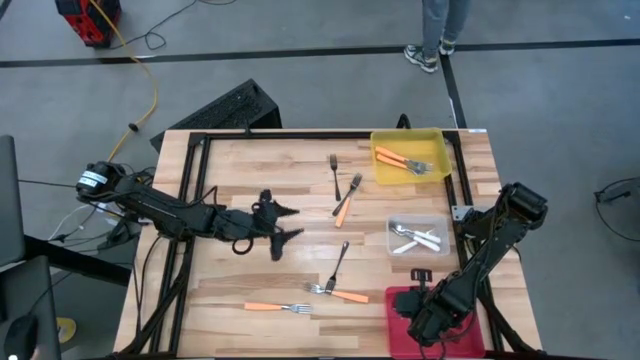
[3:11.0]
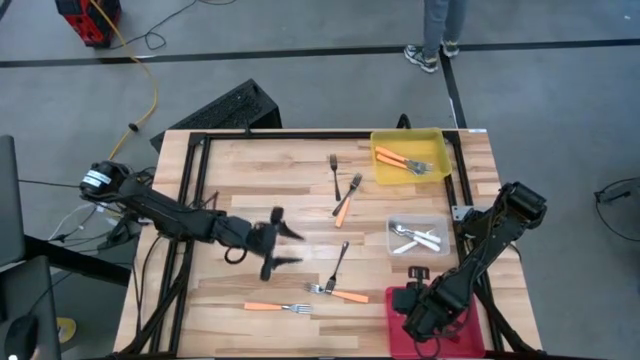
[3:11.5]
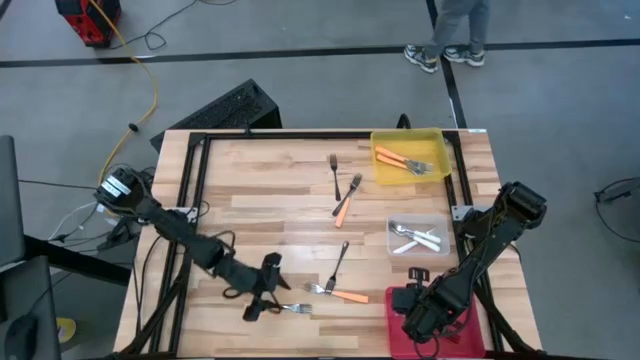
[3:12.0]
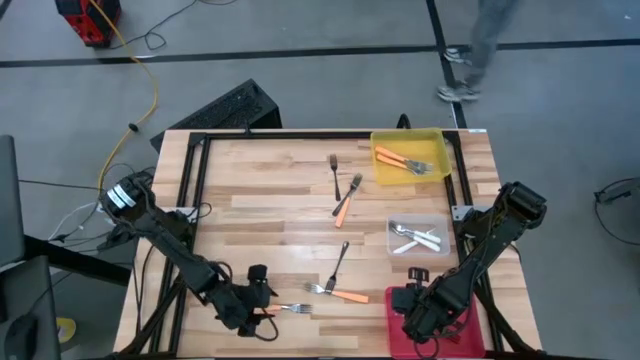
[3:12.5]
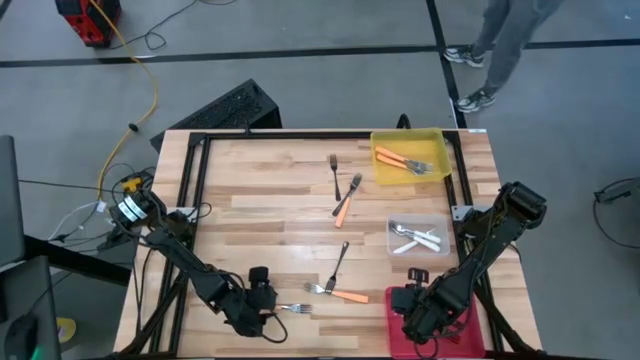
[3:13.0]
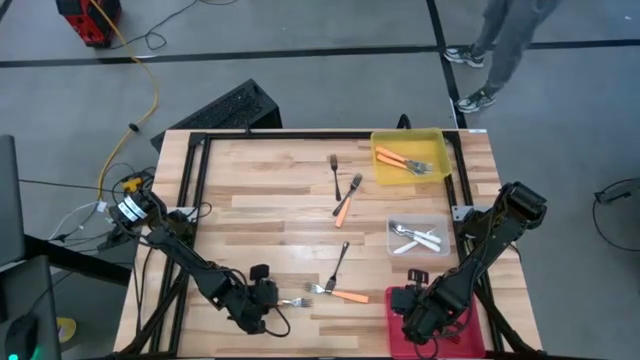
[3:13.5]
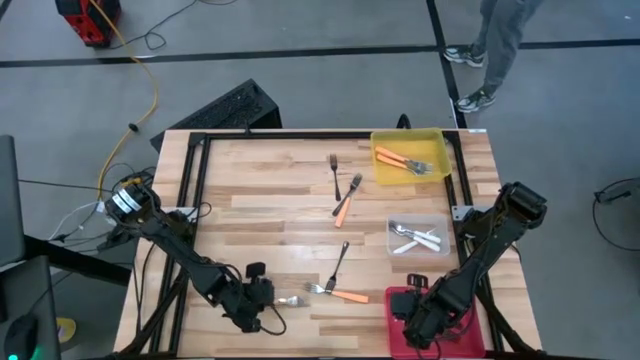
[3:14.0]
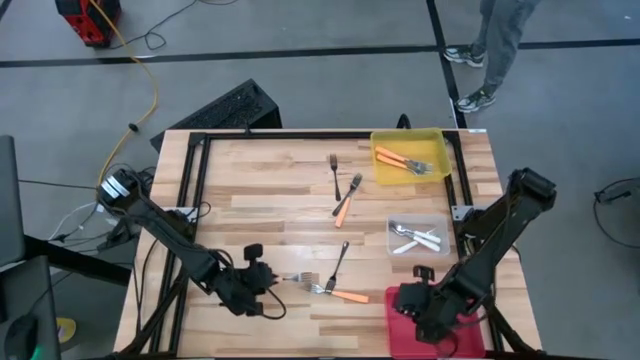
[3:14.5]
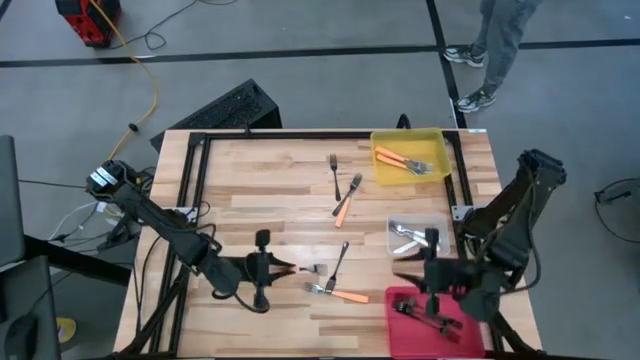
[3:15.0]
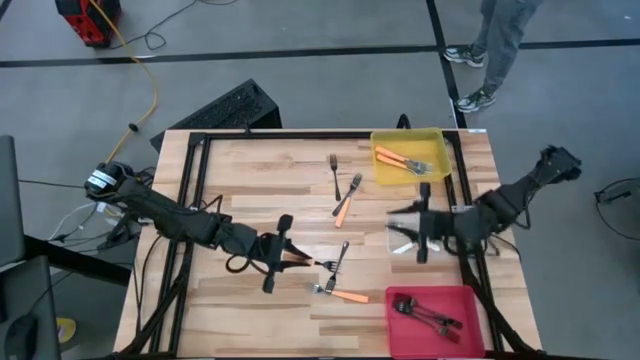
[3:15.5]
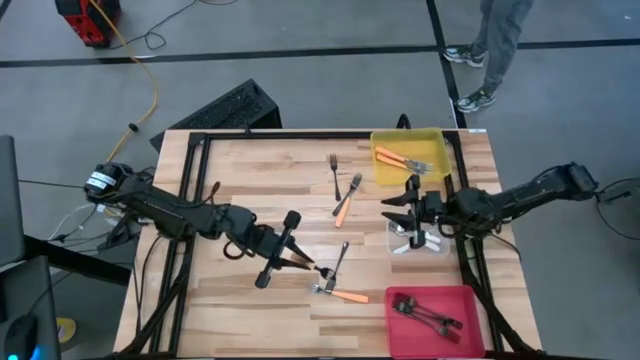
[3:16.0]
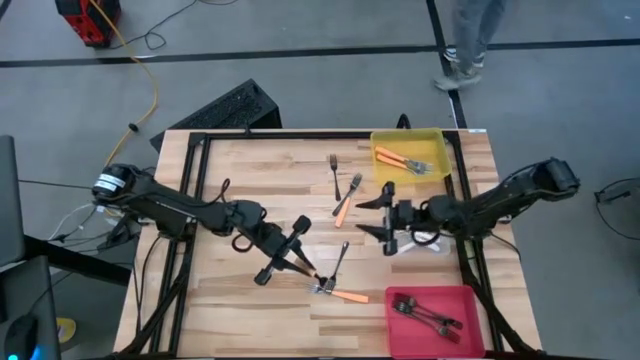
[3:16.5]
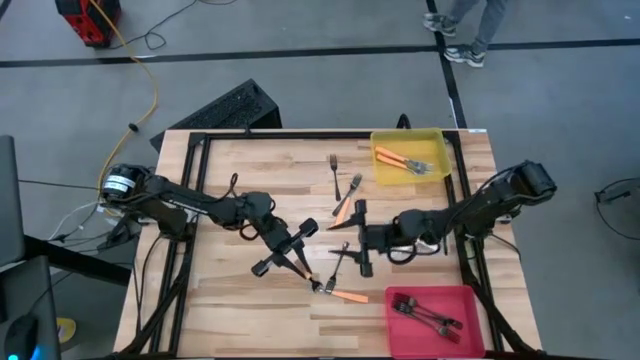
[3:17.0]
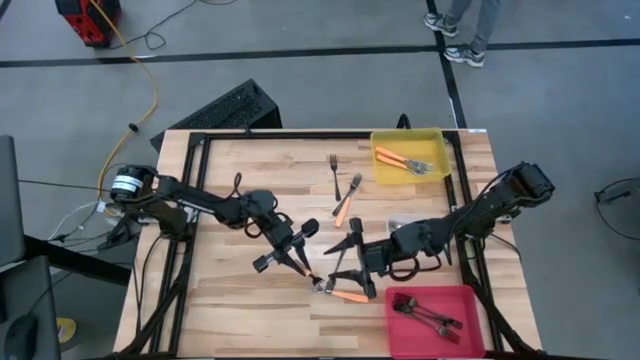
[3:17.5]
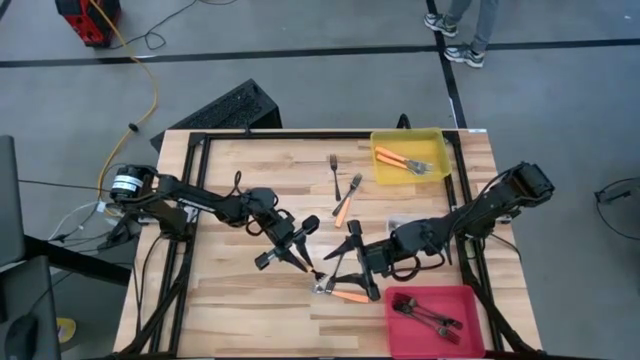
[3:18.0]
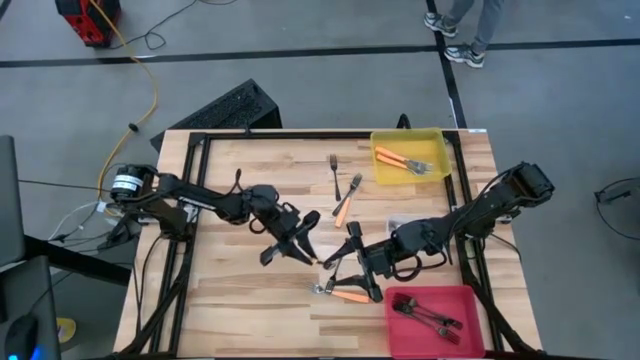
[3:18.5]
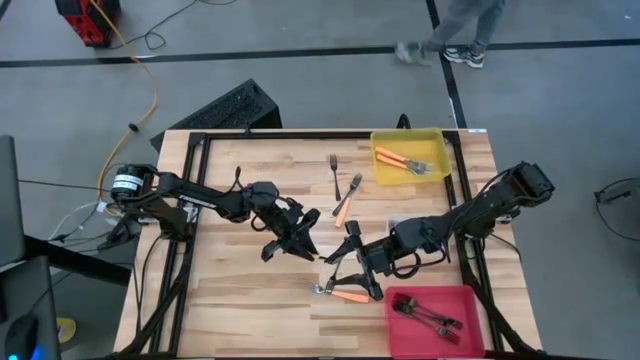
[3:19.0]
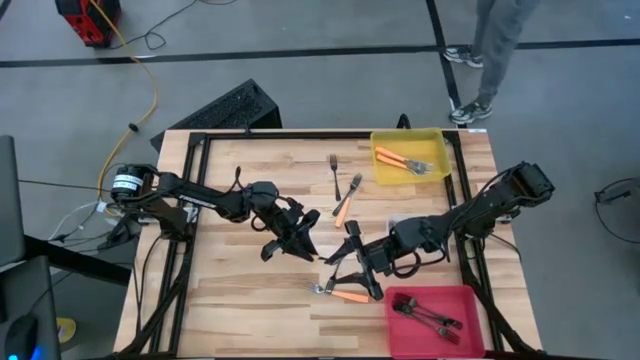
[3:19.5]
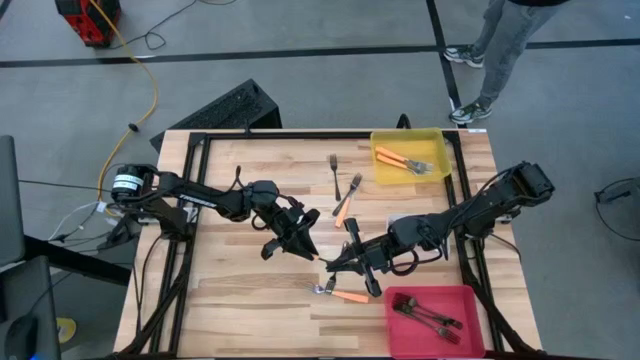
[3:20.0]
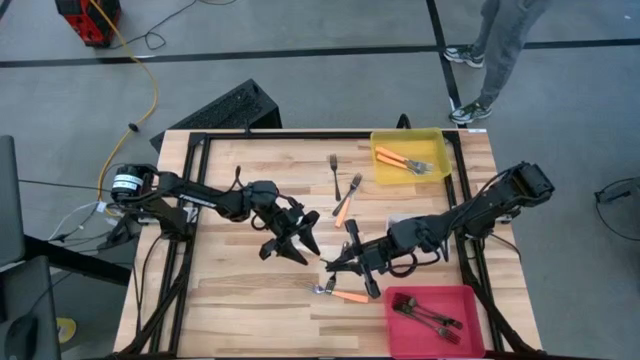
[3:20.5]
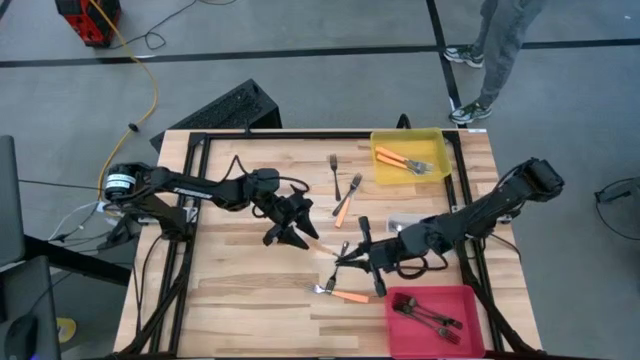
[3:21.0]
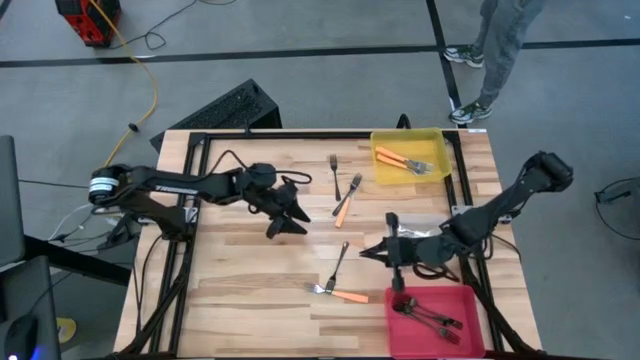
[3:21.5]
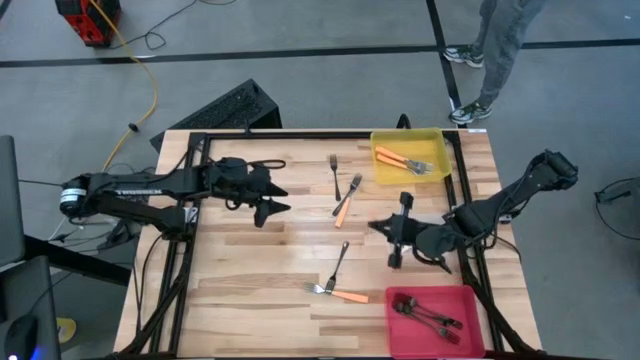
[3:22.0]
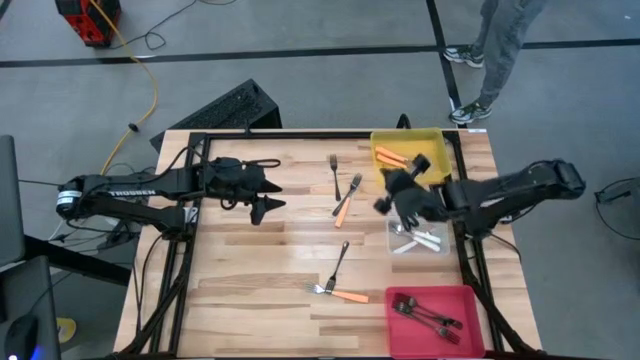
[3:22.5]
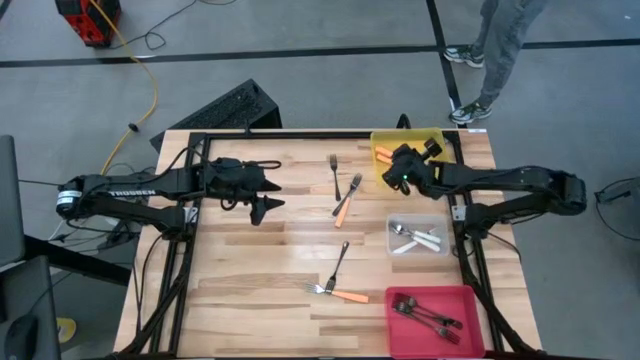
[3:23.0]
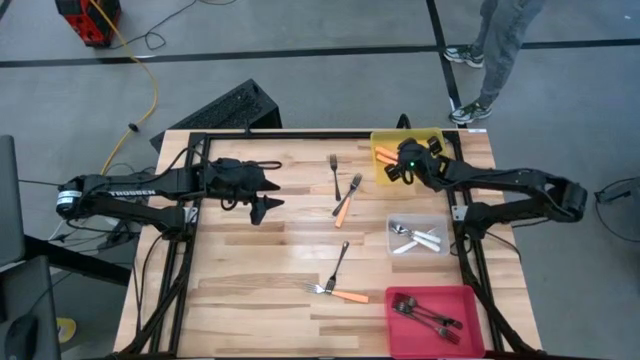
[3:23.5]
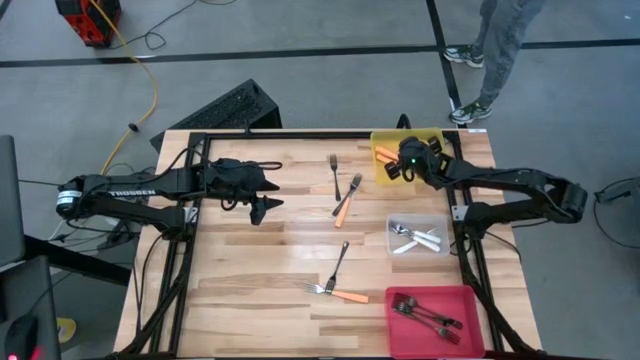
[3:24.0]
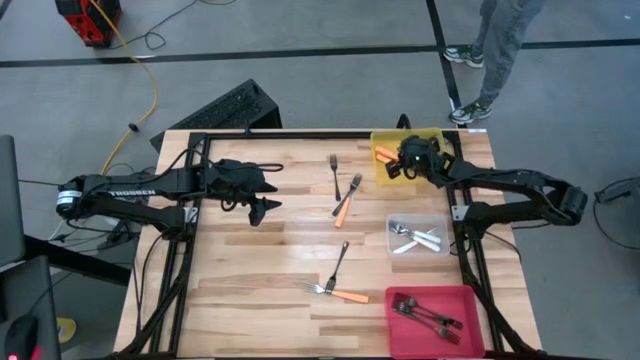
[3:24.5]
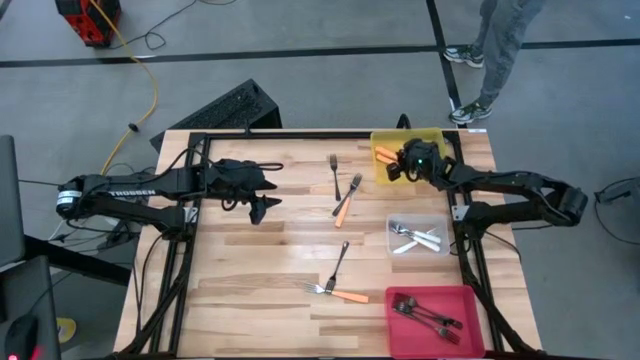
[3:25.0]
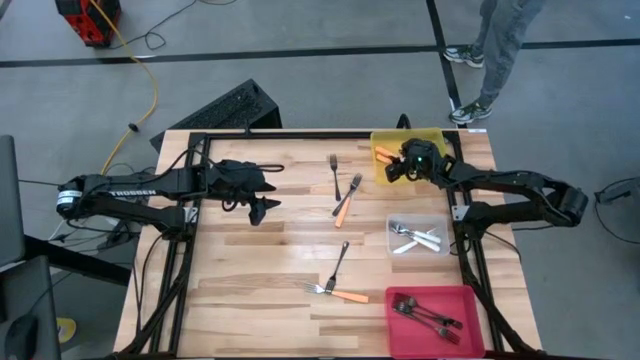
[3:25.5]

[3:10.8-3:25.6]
Task: Sort silverware by color (type)
Put the orange fork into the yellow bin

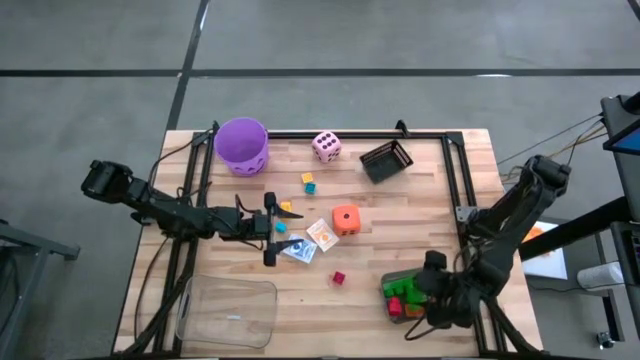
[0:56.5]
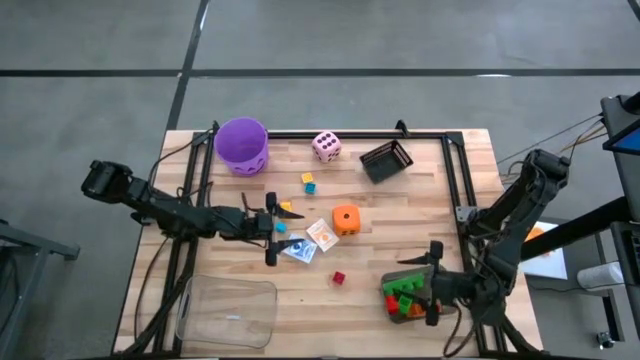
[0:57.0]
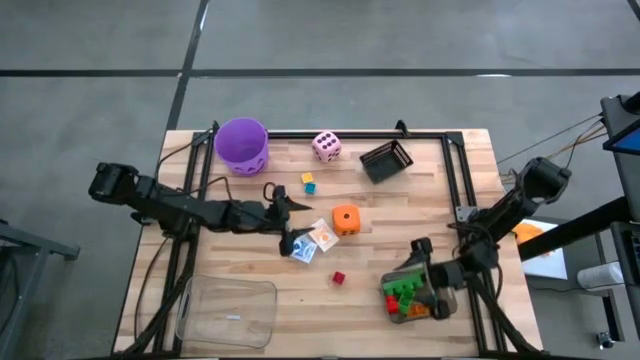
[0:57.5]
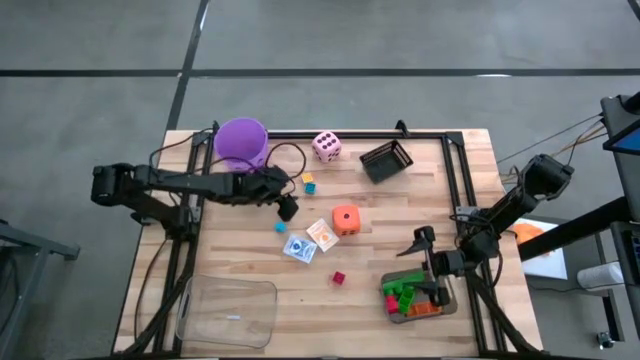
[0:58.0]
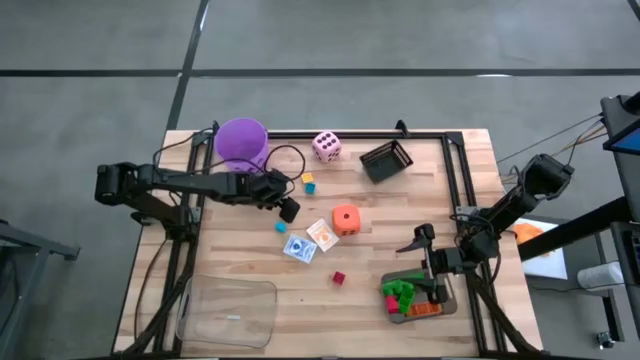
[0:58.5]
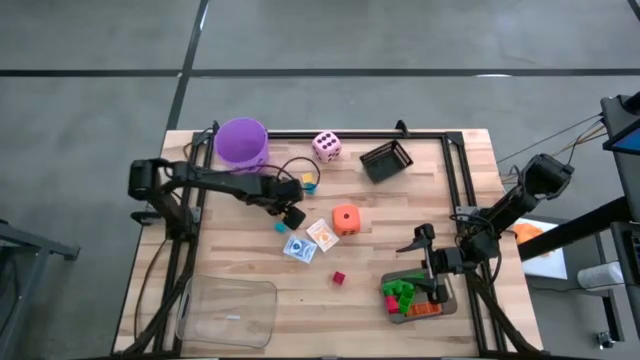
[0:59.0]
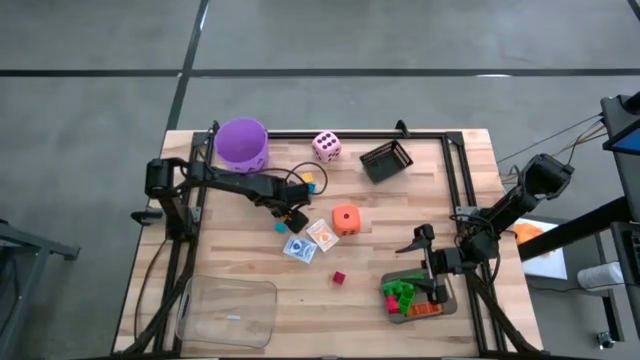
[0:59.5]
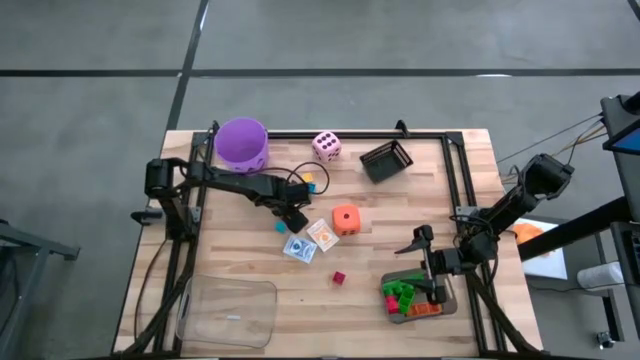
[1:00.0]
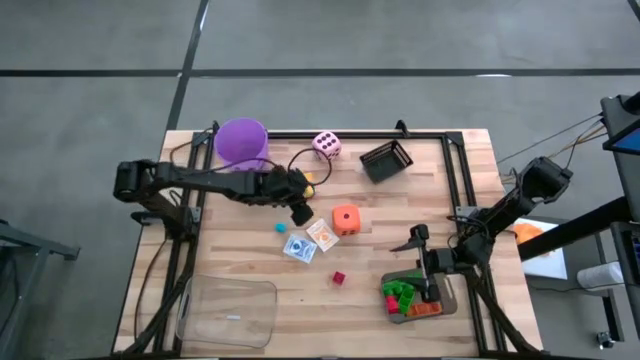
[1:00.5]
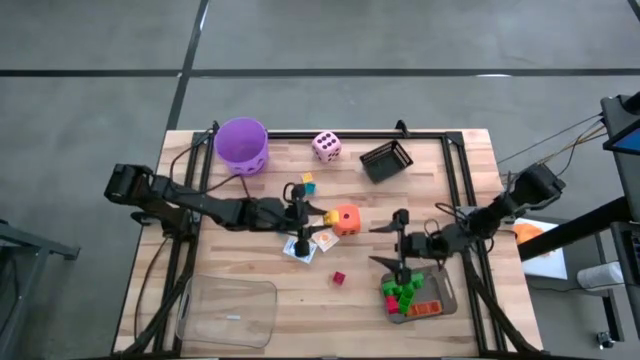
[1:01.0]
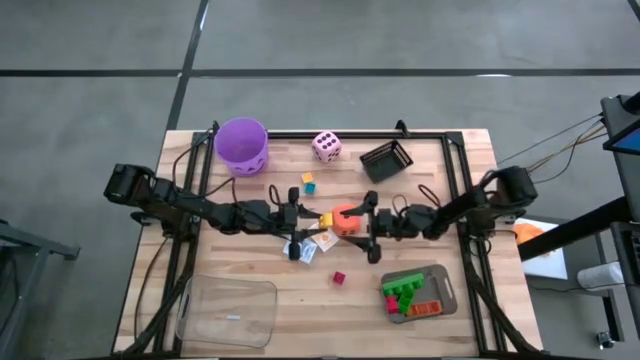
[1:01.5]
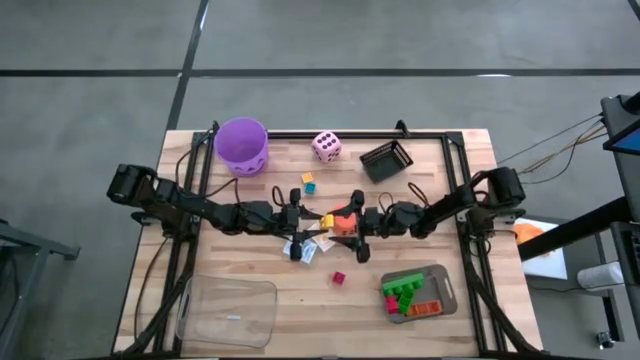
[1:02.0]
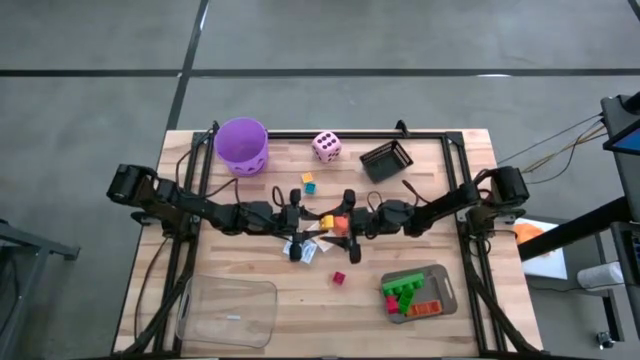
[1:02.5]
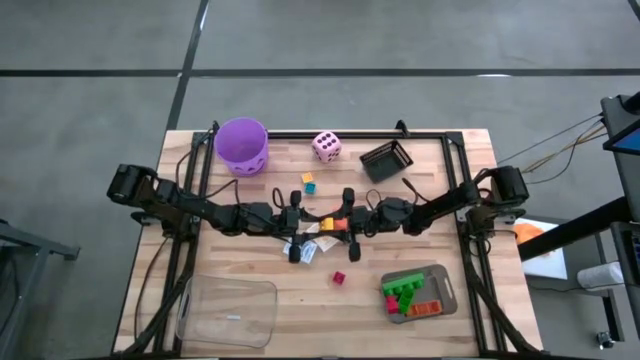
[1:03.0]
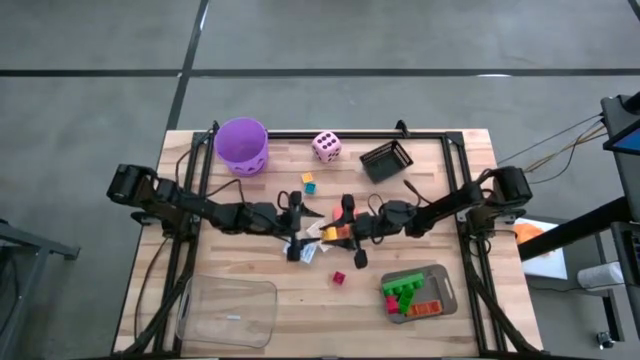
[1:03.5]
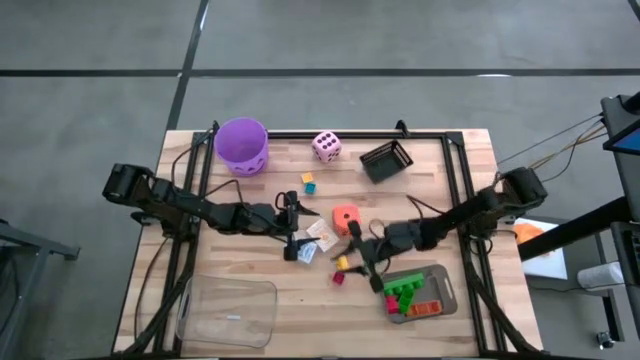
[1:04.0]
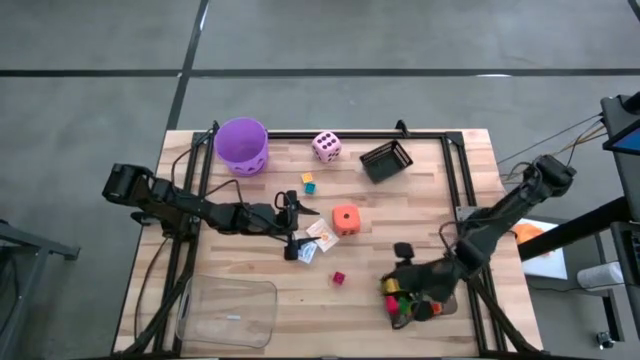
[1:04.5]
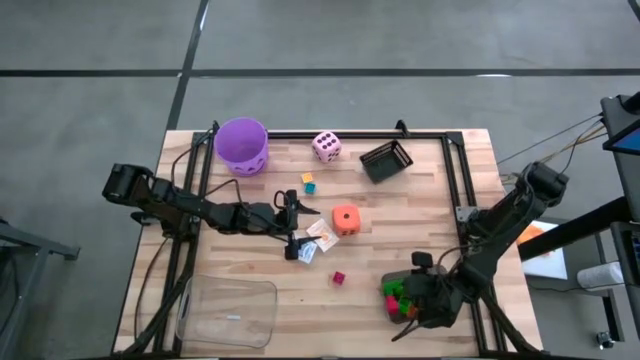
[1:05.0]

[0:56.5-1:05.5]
Task: Pick & Place Toys
Put the yellow game piece into the black bin
